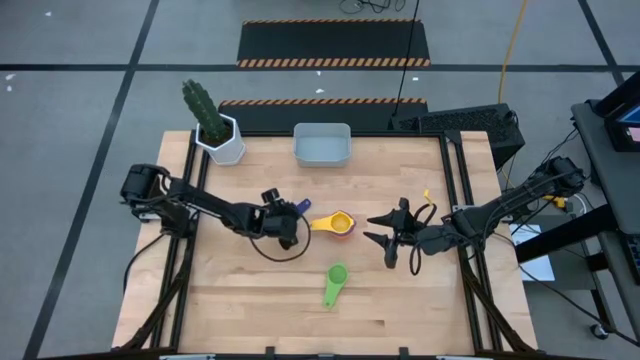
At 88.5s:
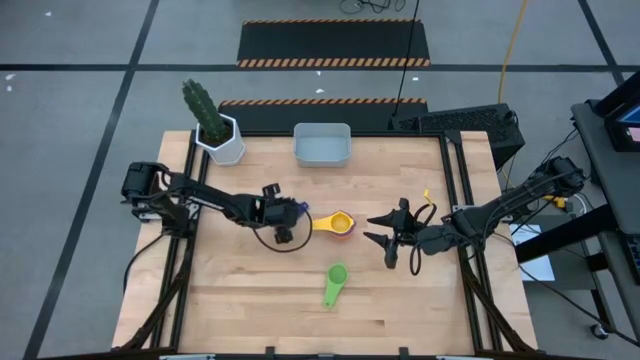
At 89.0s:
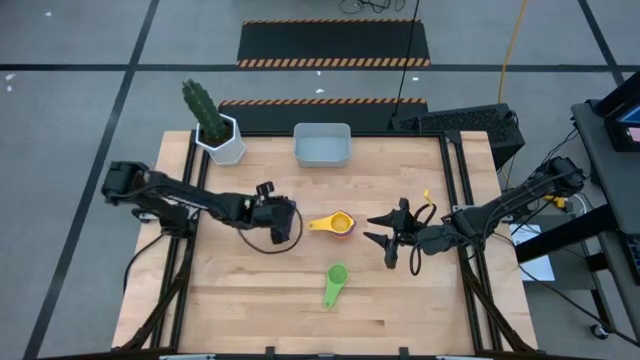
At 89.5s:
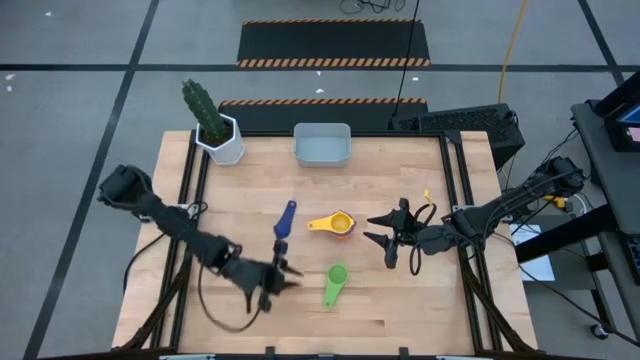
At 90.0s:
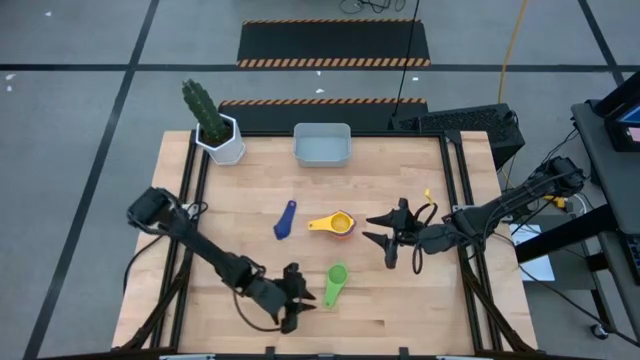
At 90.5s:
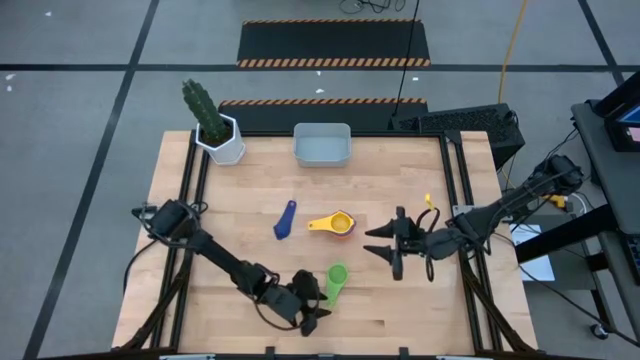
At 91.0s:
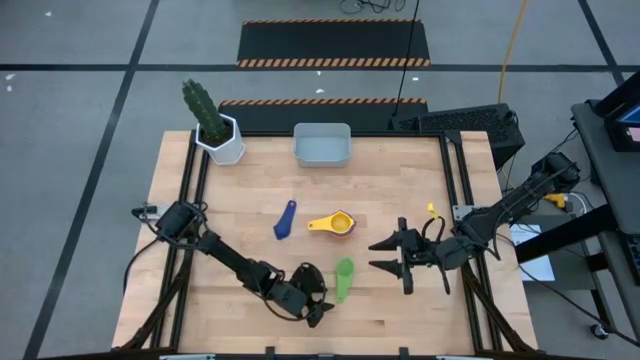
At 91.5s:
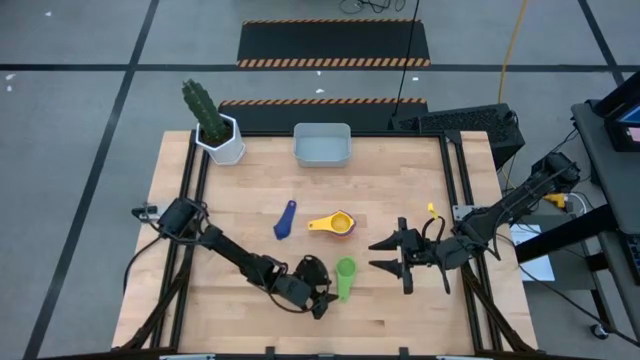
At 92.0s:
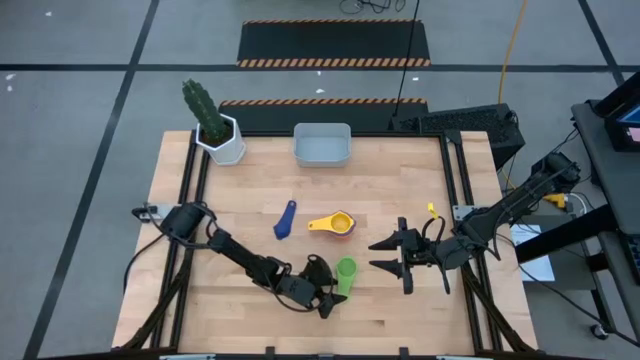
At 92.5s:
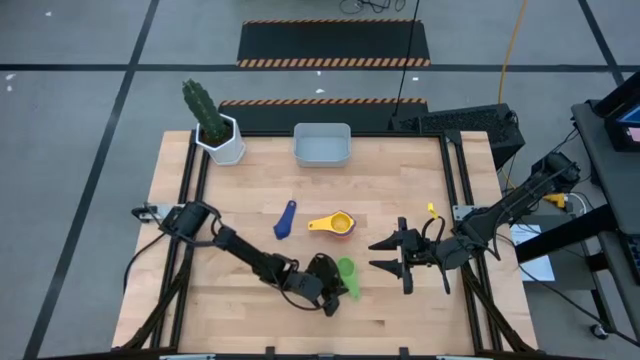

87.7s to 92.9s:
Task: Nest measuring cups in basket
Stack the green measuring cup on top of the yellow measuring cup

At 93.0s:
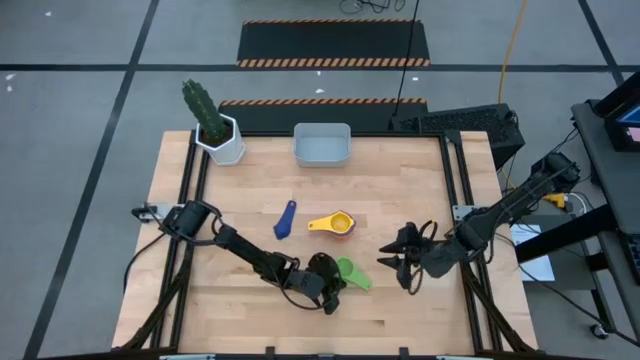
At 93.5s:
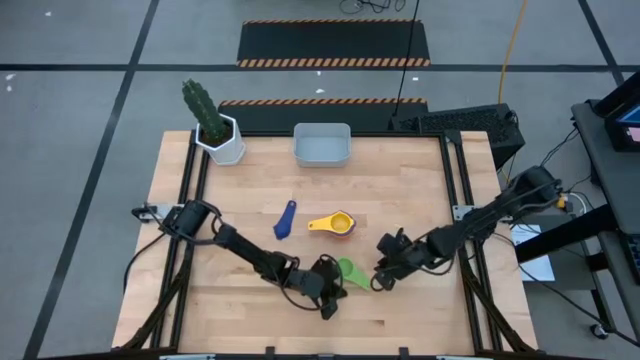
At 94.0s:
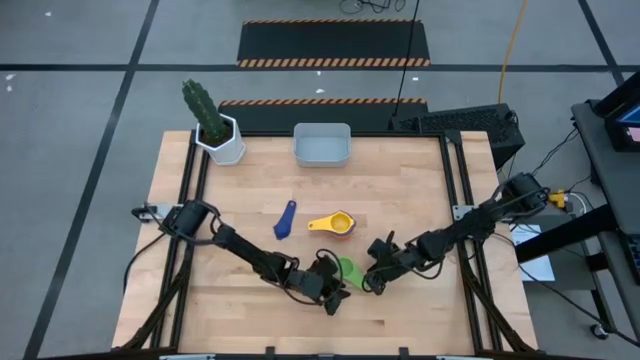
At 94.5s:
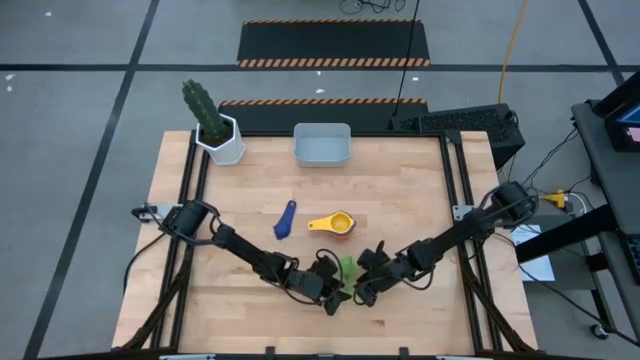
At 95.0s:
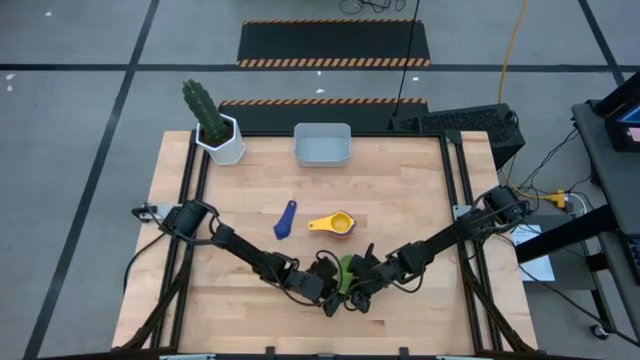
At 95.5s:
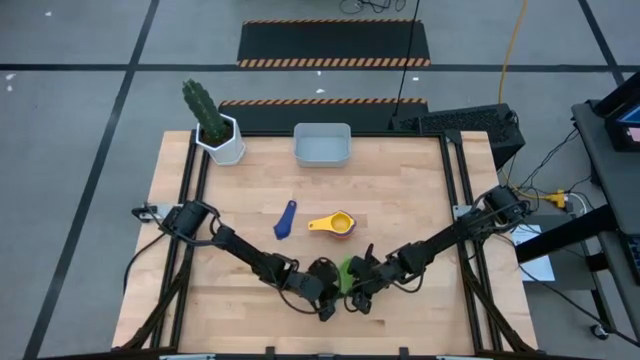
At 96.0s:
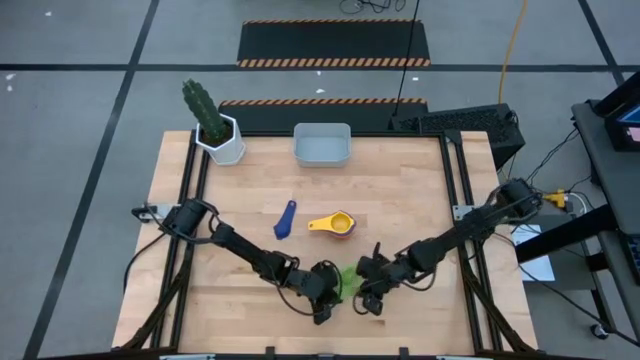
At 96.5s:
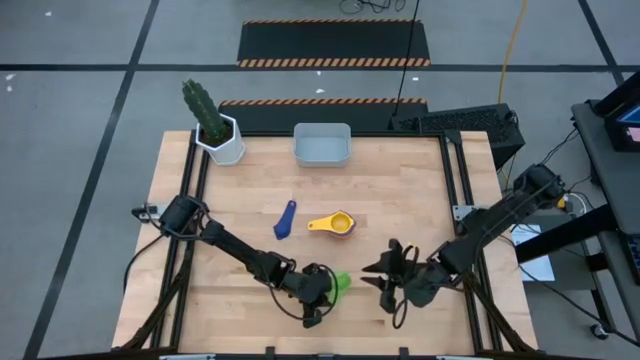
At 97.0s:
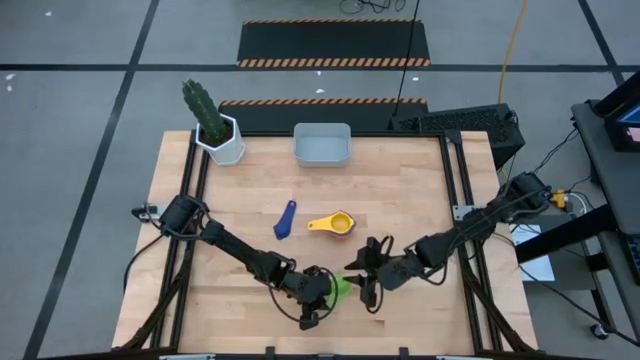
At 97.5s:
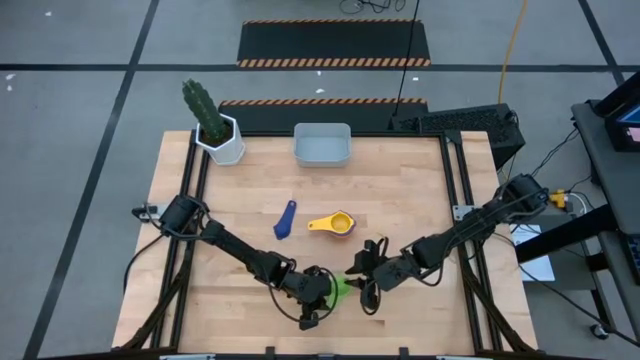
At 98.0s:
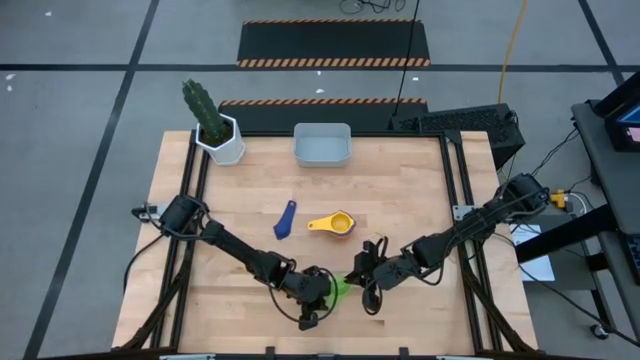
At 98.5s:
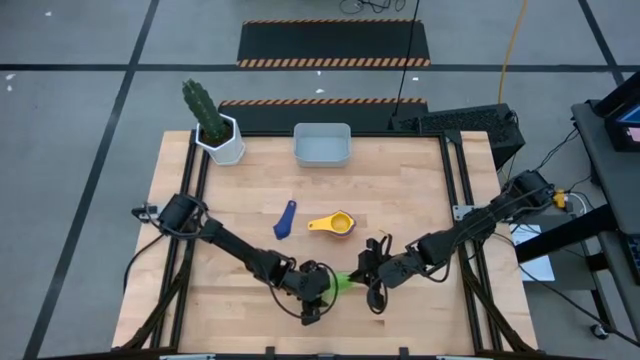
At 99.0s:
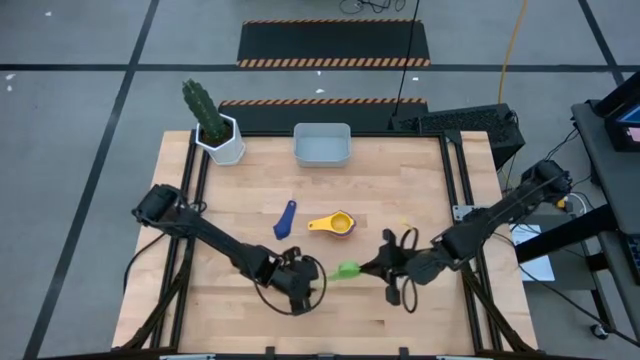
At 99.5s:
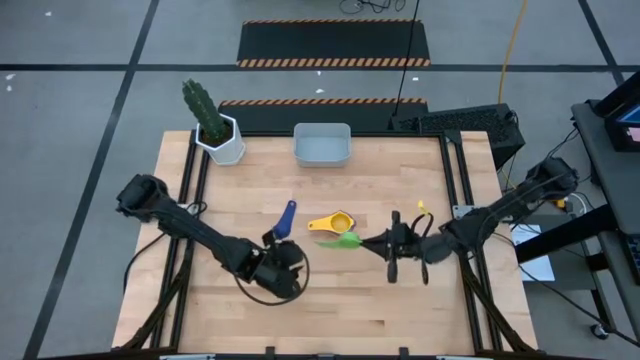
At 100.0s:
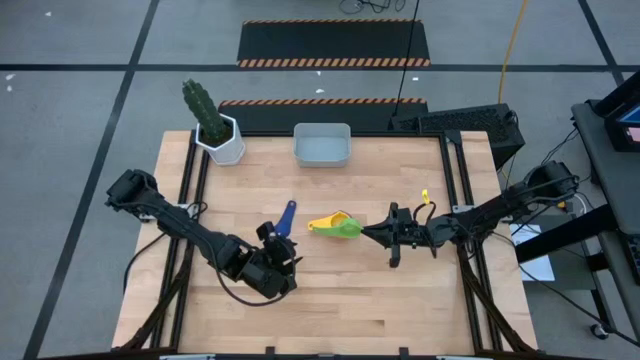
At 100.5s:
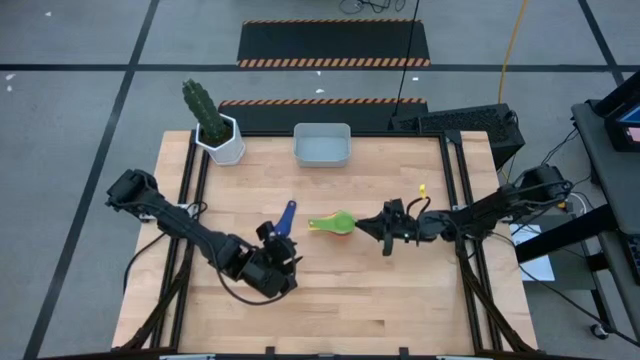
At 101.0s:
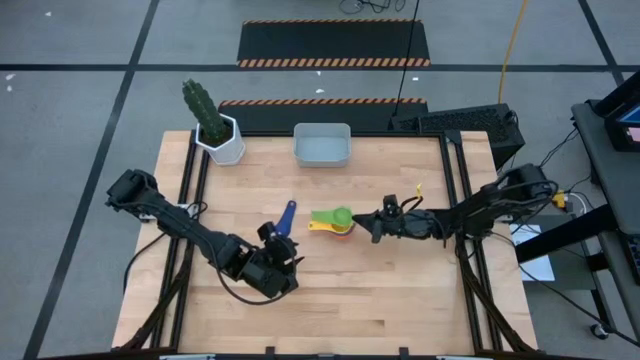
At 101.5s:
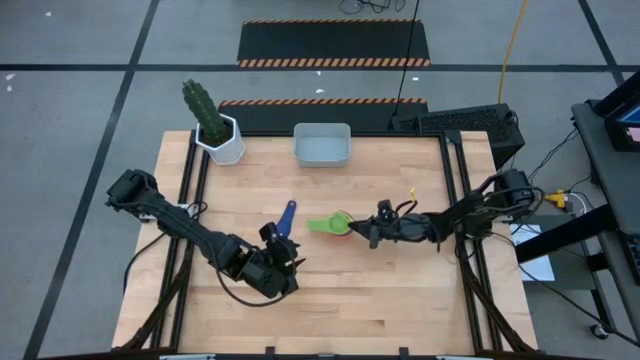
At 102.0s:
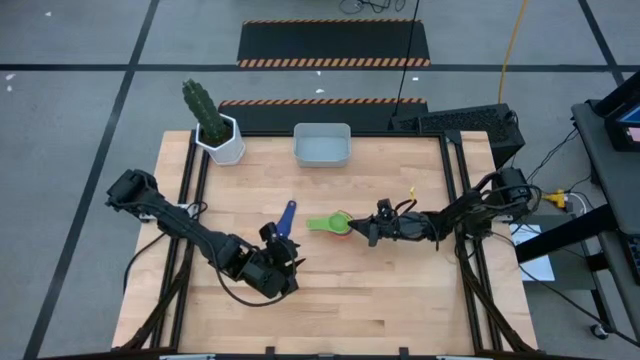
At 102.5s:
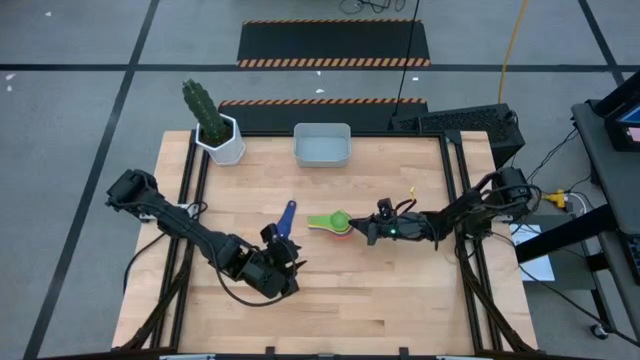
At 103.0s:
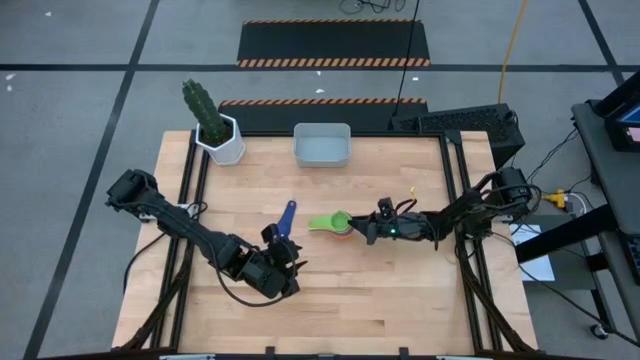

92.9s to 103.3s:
Stack the green measuring cup on top of the yellow measuring cup

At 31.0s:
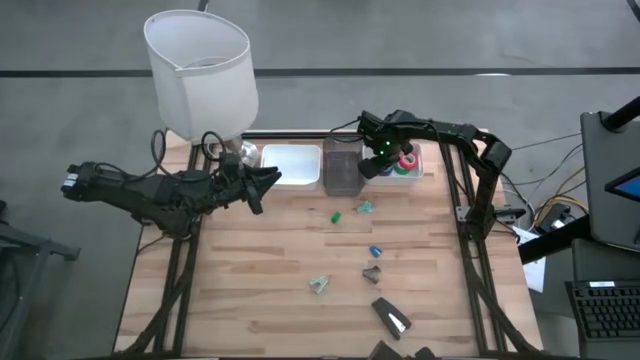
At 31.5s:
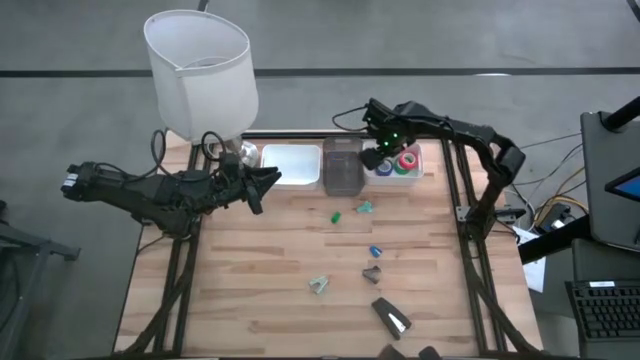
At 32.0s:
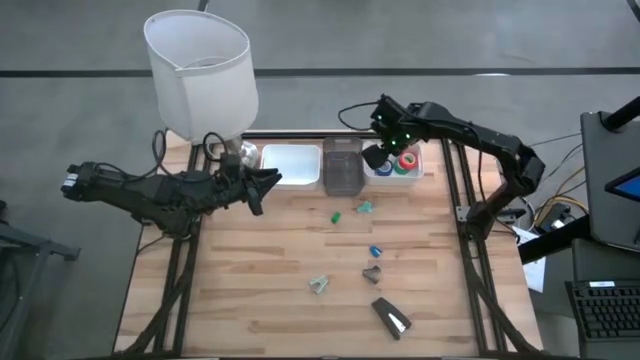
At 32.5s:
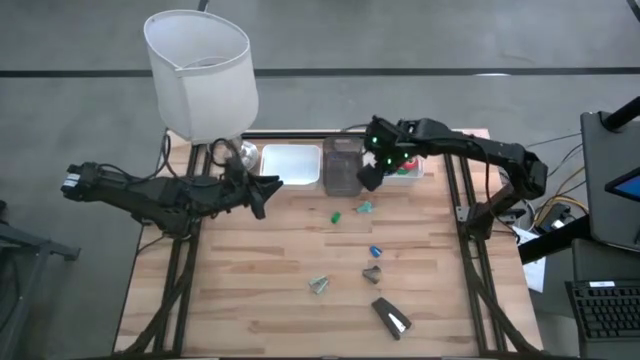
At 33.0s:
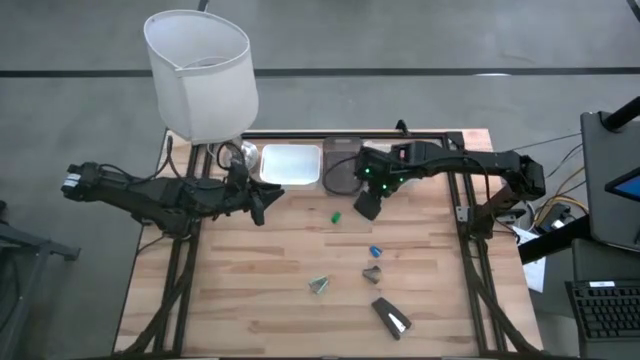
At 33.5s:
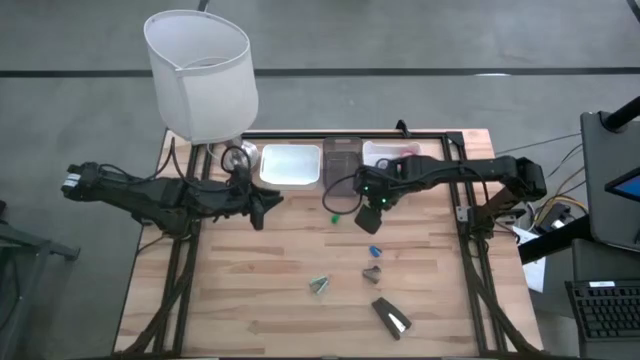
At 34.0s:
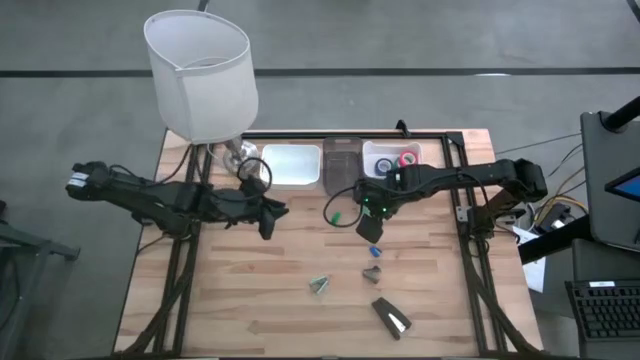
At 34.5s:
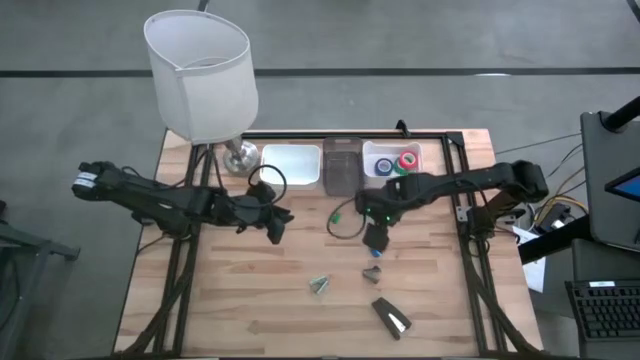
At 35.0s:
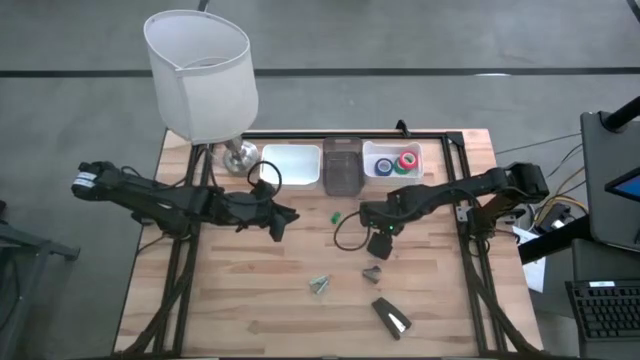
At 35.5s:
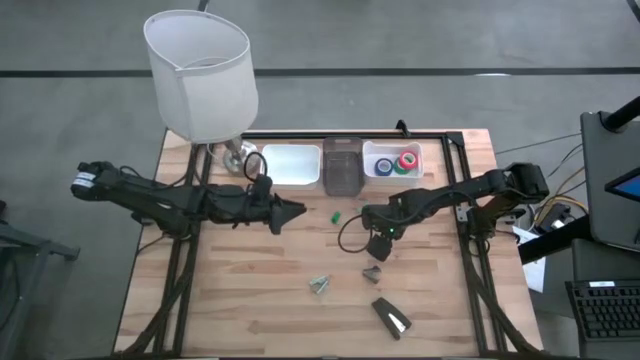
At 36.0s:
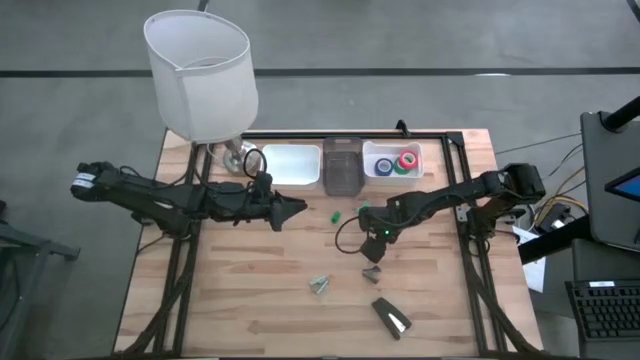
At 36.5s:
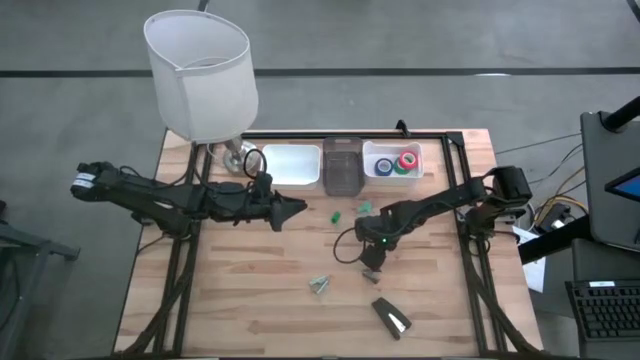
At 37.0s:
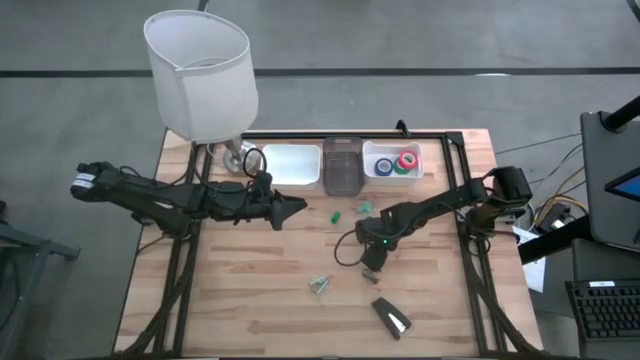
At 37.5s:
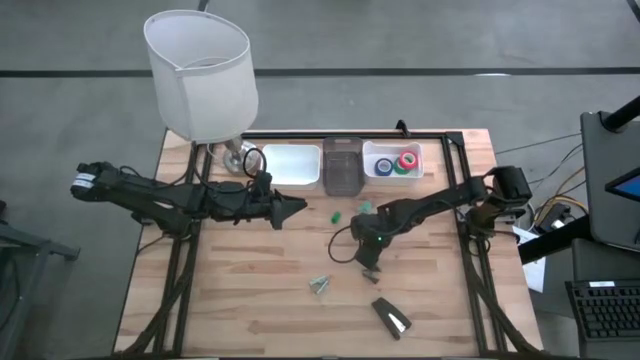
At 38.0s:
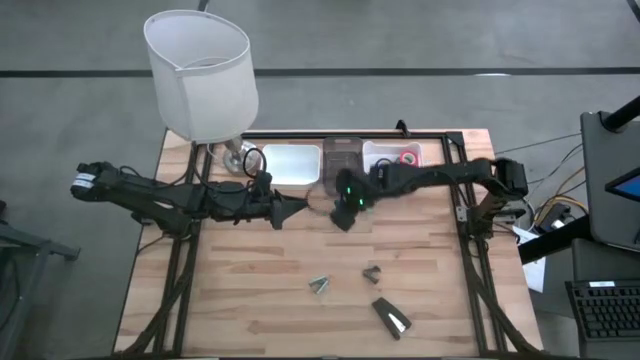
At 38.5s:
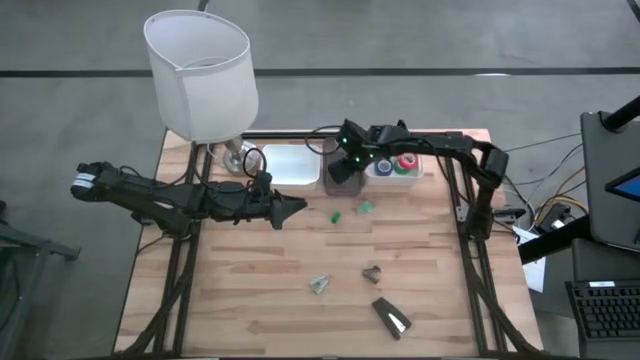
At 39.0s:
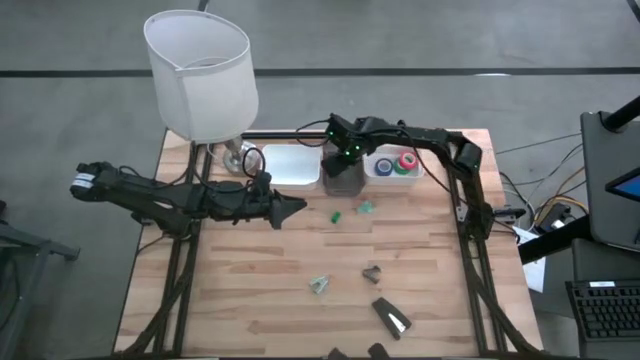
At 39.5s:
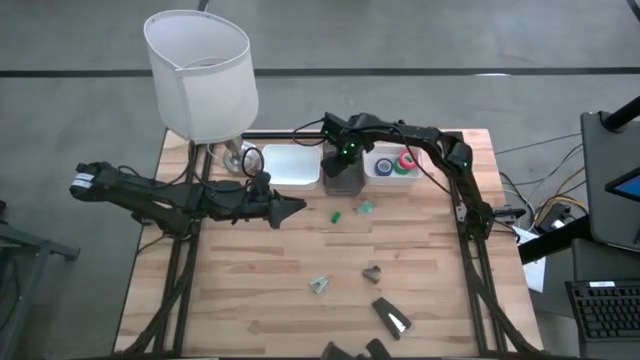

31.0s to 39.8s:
Task: Pick and place Stapler, Stapler remover, tape
Put the blue stapler into the black transparent bin
